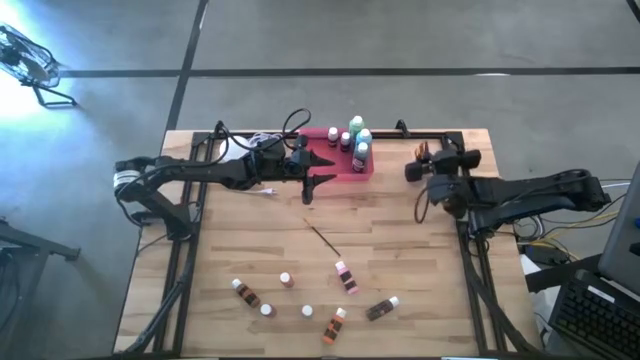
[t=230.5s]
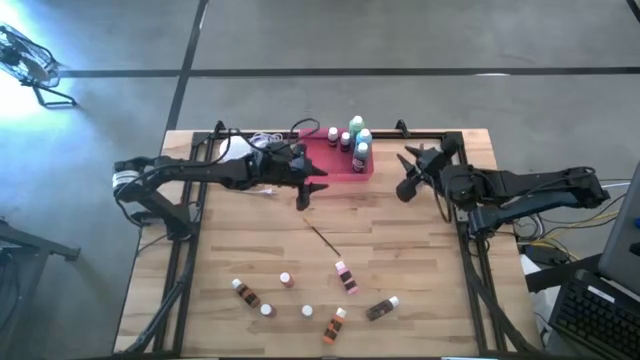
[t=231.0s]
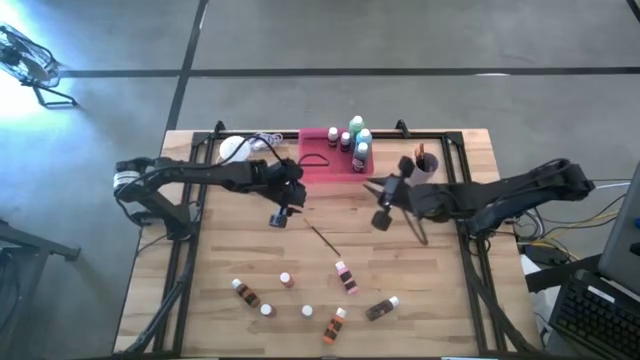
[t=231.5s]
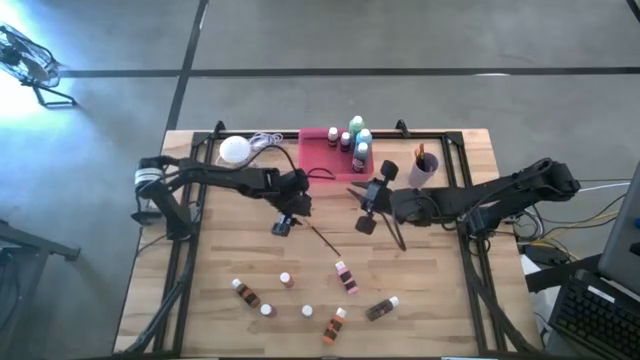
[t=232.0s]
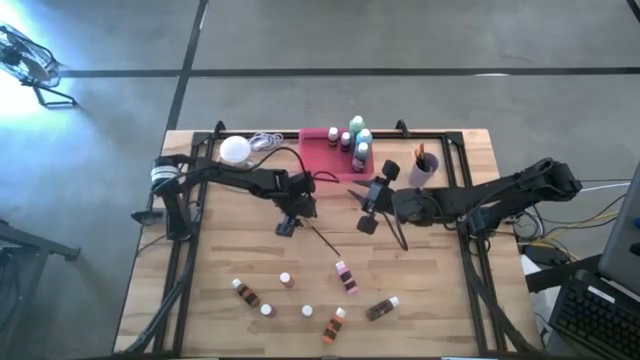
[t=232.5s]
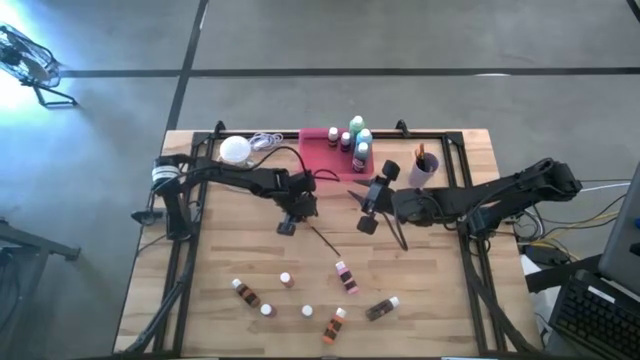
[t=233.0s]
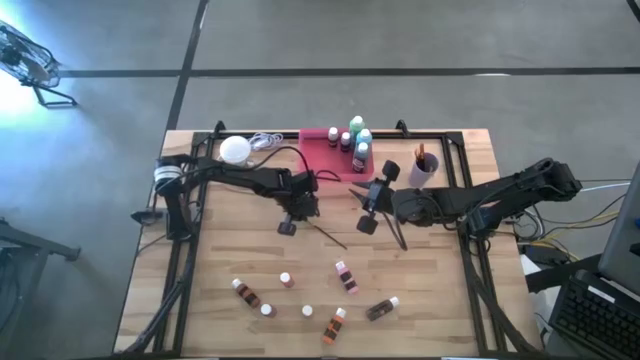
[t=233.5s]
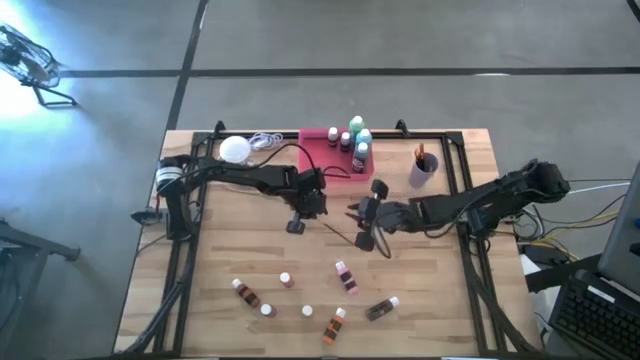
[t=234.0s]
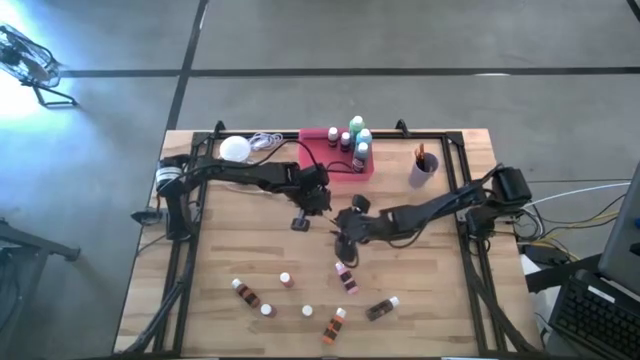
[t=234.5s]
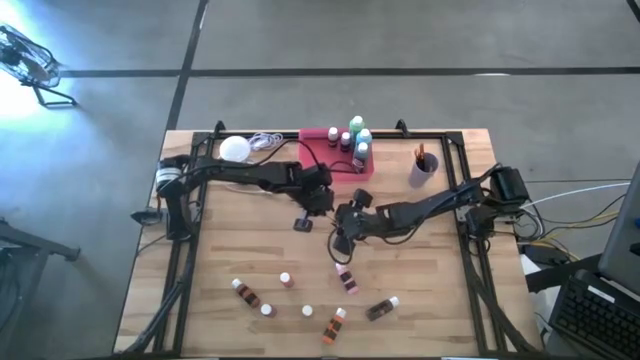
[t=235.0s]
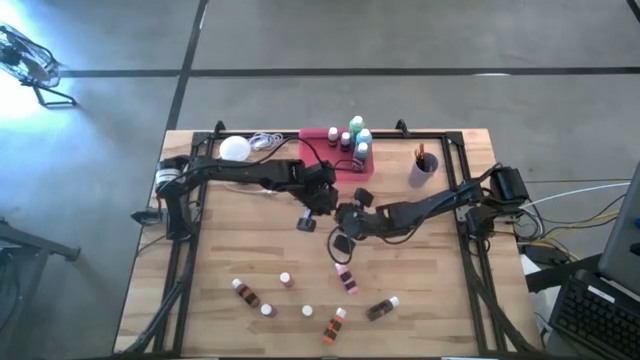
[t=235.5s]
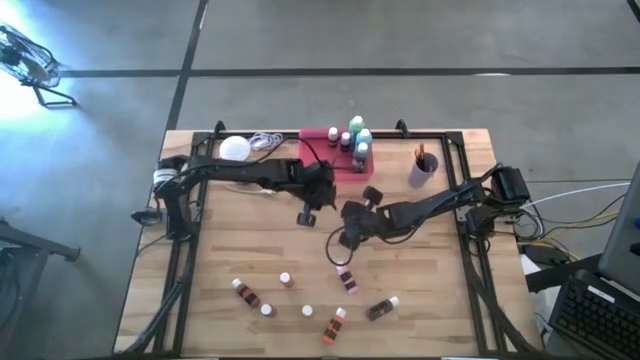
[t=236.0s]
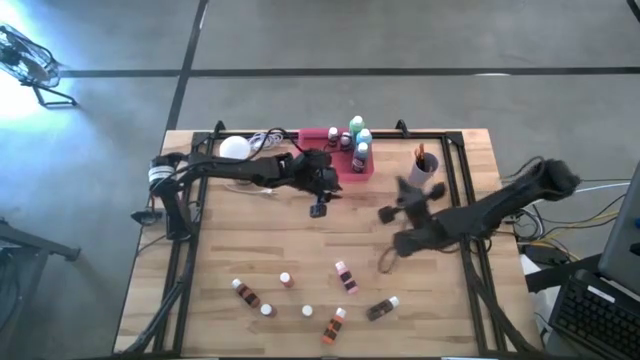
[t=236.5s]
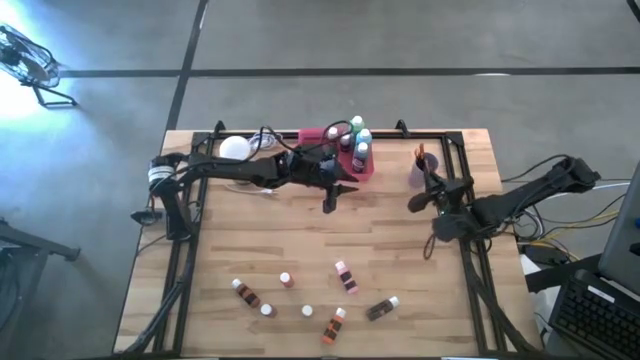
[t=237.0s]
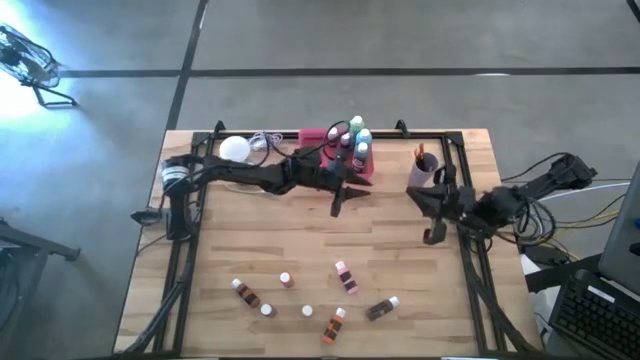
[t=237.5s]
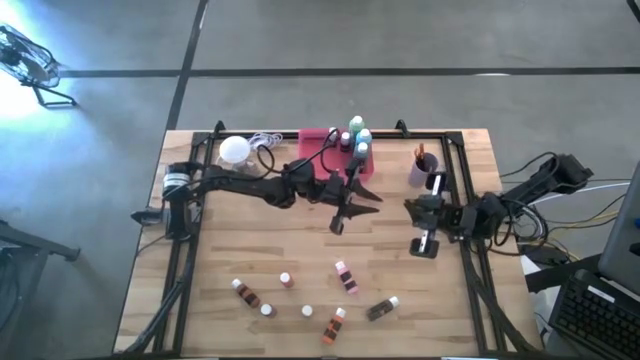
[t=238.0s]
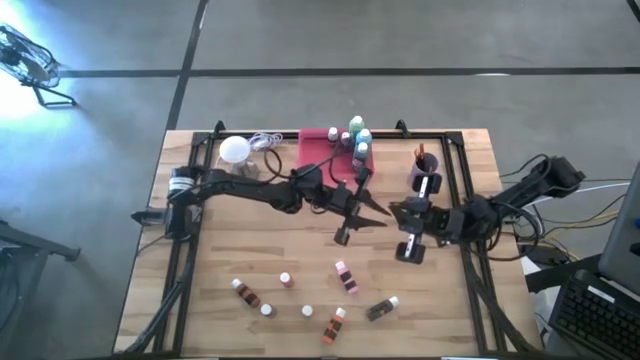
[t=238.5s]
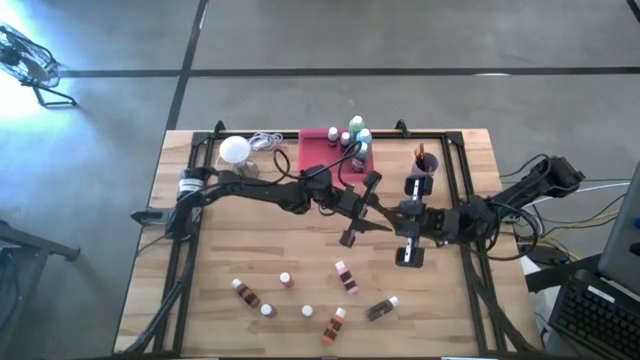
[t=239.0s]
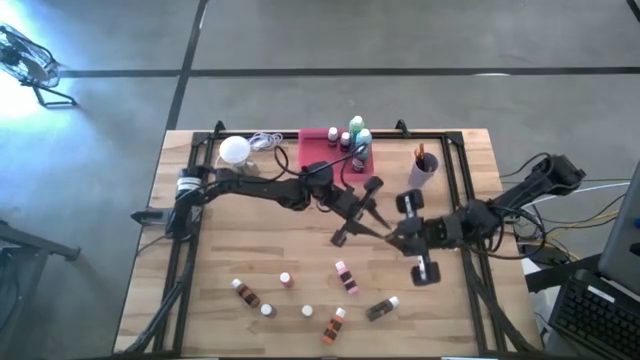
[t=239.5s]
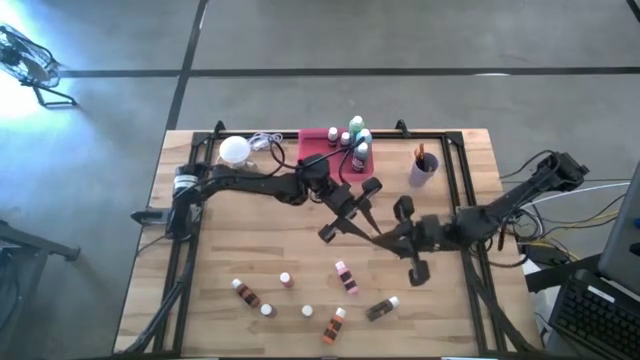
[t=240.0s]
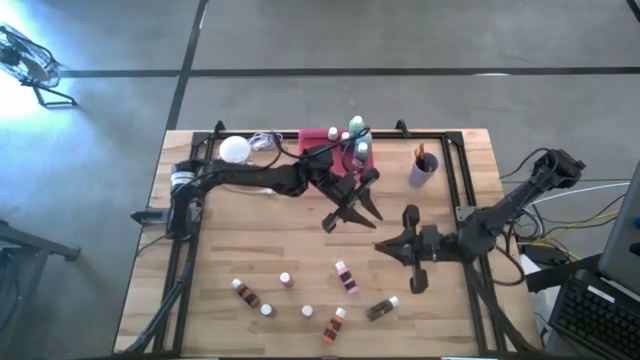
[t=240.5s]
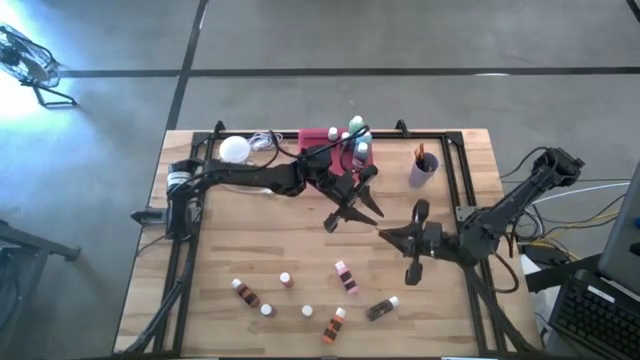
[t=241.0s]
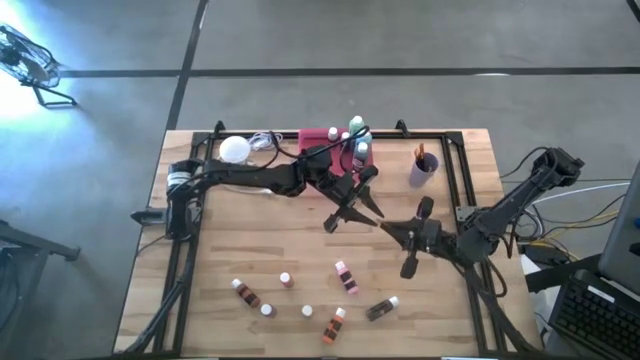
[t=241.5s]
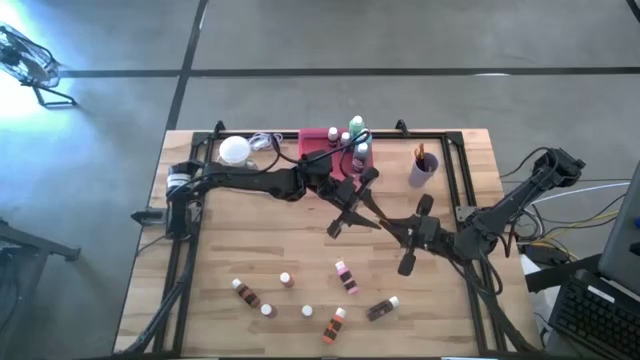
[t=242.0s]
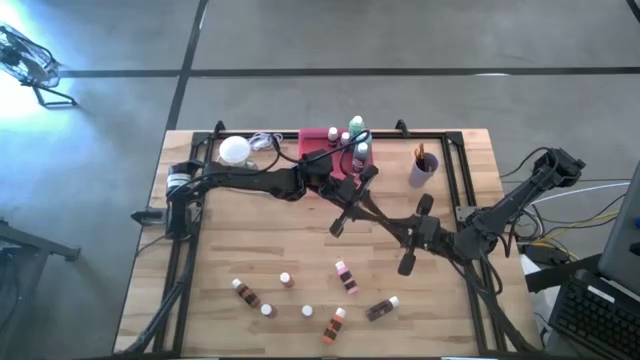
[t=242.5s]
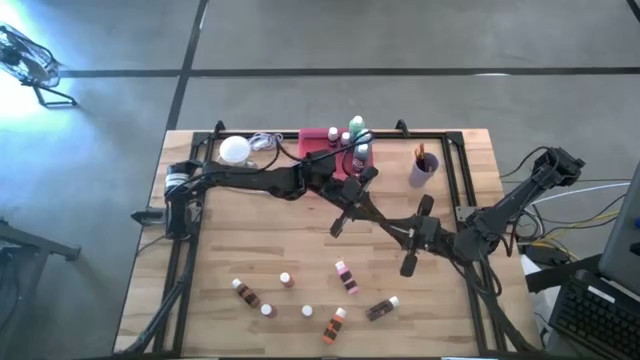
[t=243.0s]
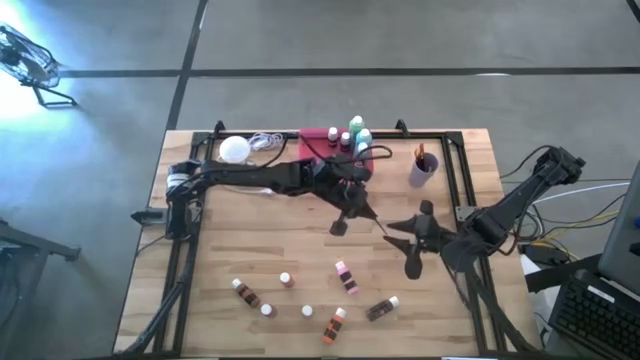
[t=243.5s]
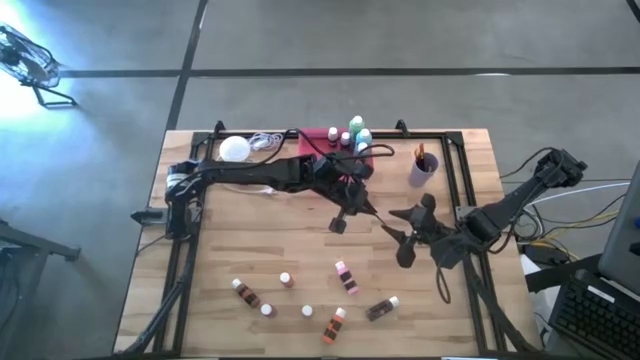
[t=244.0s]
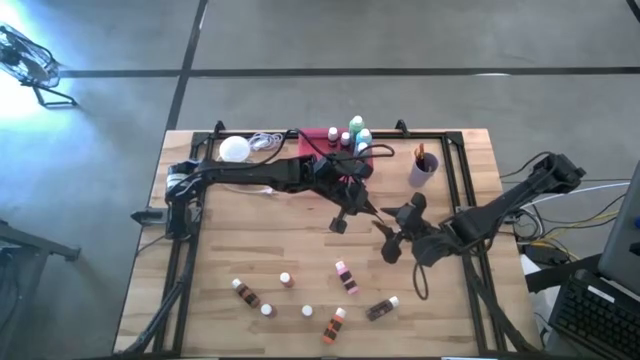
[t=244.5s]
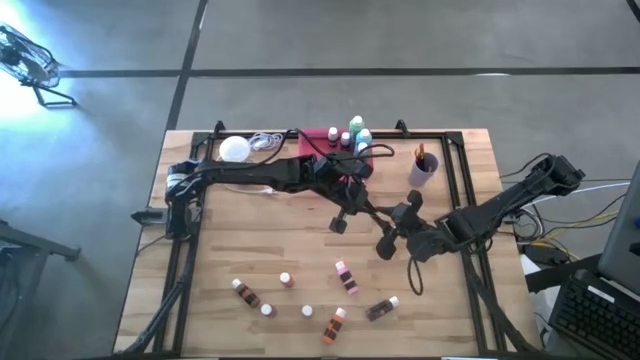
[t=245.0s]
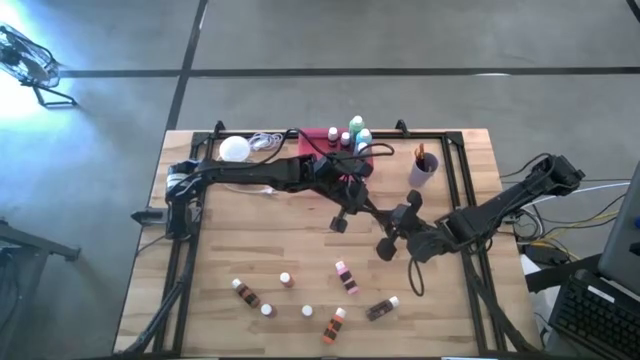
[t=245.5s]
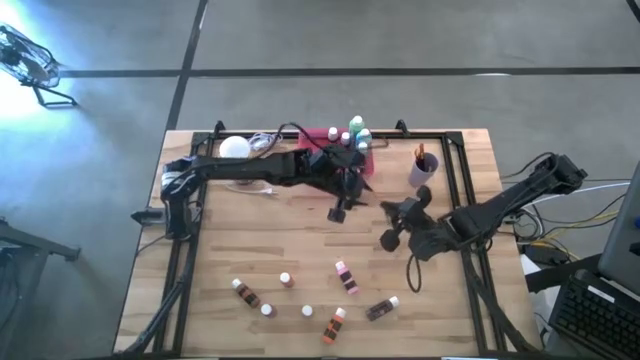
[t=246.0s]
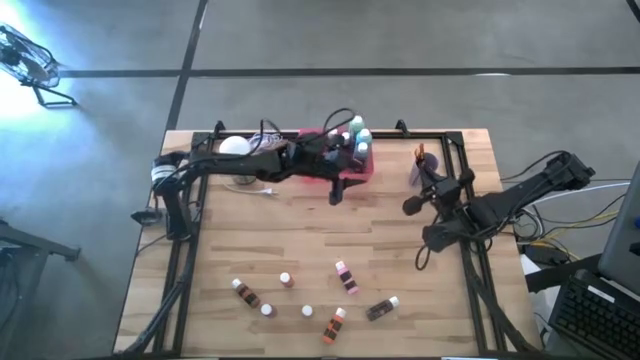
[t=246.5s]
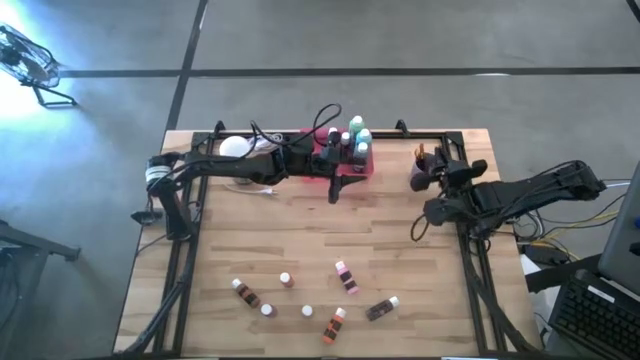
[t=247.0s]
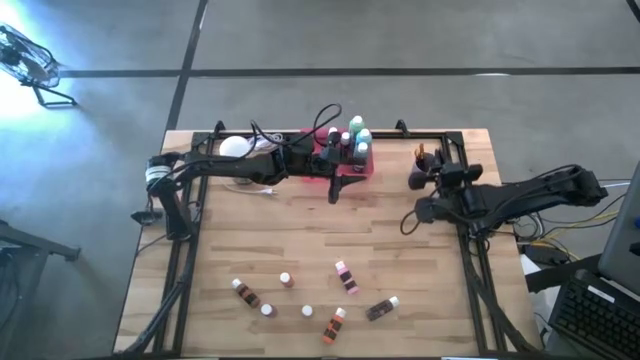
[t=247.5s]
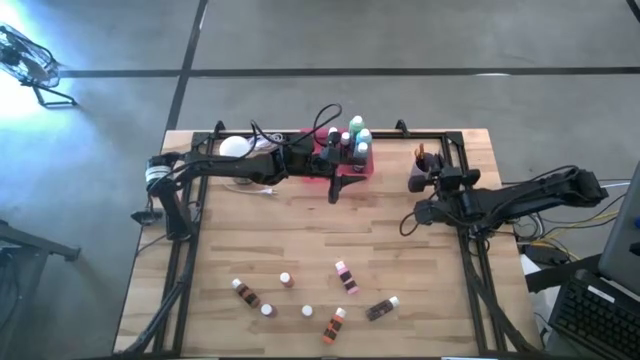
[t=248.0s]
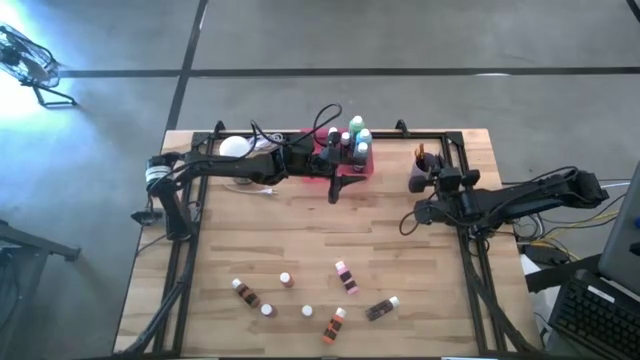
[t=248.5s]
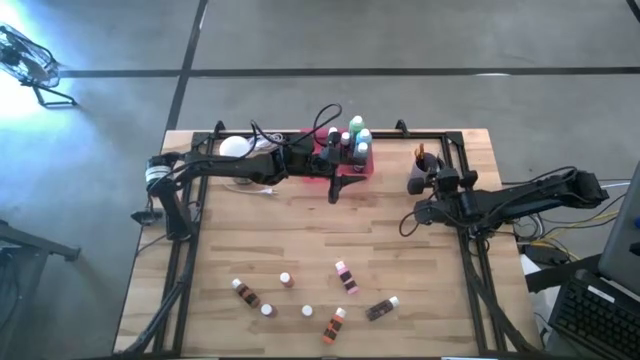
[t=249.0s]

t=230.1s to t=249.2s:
Task: Pick & Place Paint Supplies
Put the black gold paint brush into the violet cup

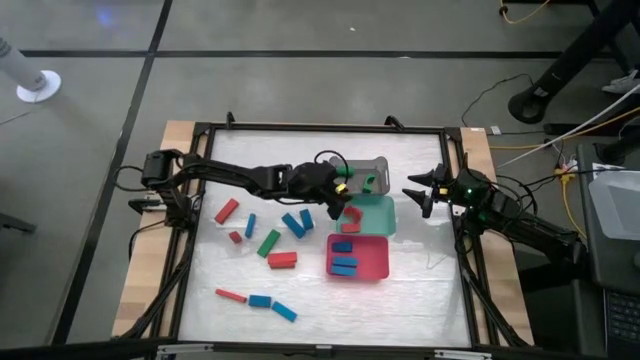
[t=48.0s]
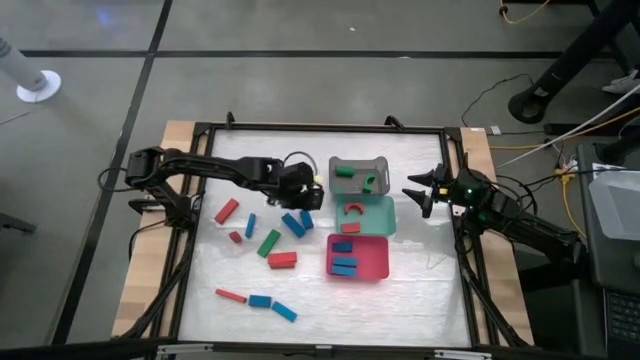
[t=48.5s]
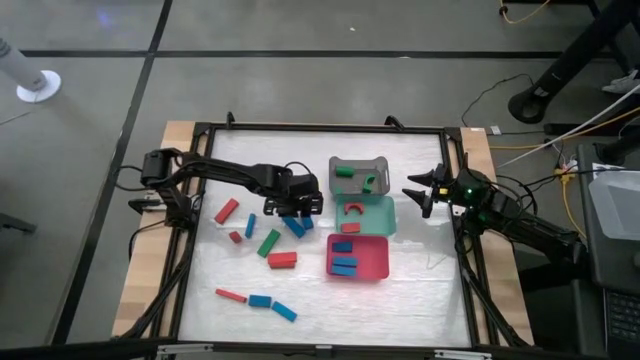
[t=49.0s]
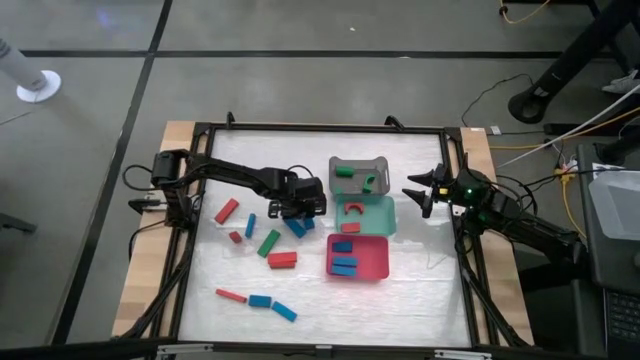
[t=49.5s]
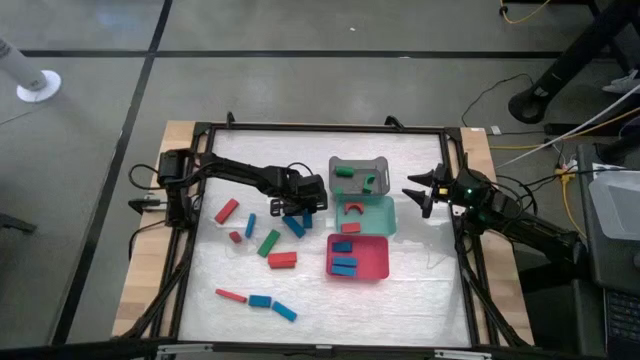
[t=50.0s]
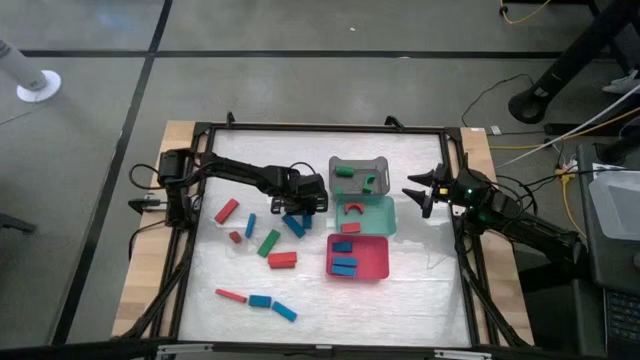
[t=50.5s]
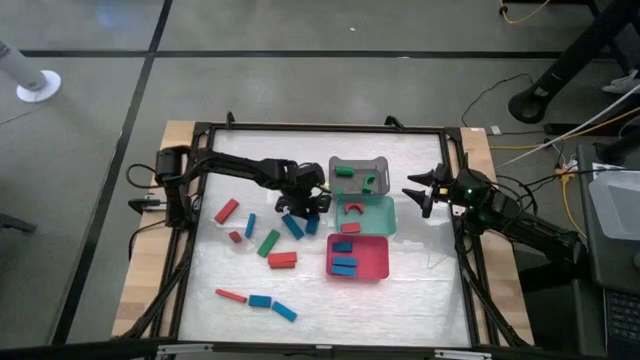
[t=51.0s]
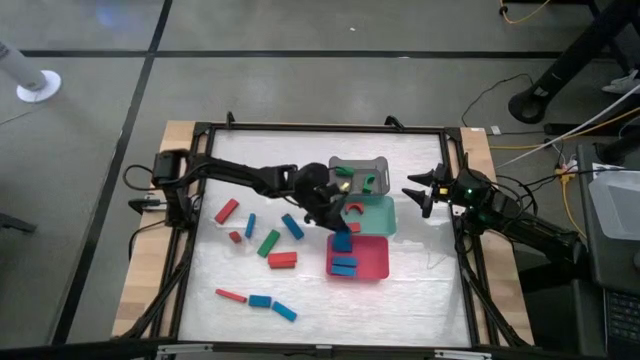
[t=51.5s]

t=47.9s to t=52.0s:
Task: Sort blocks
Put the blue block into the red bin
